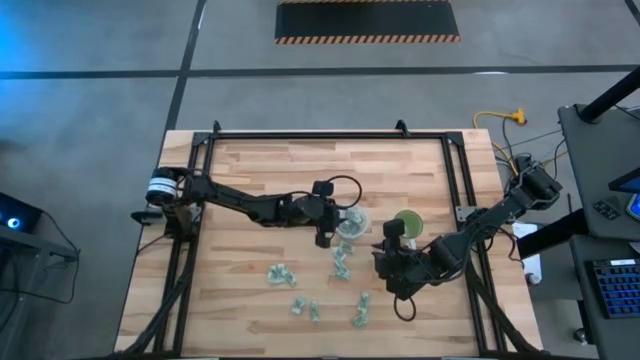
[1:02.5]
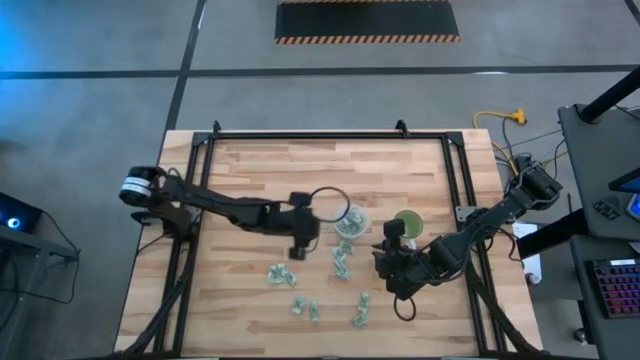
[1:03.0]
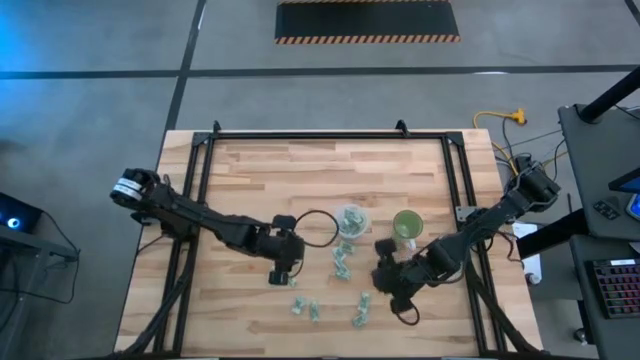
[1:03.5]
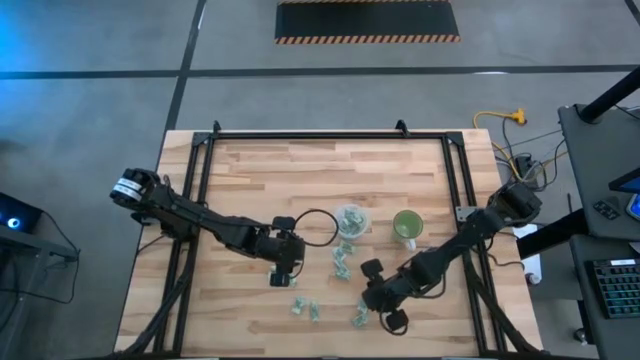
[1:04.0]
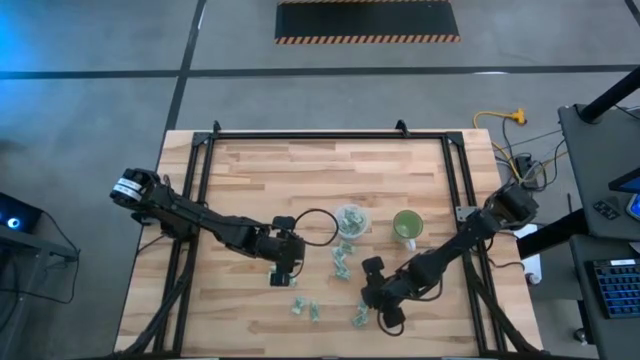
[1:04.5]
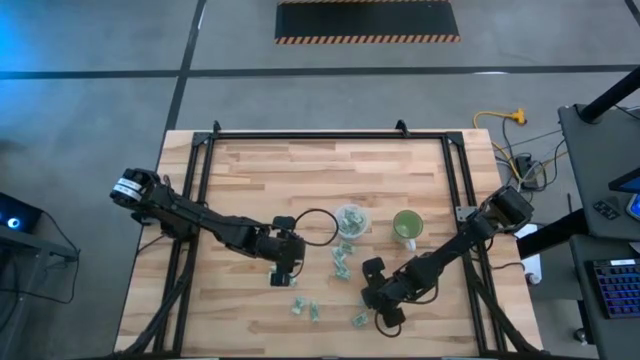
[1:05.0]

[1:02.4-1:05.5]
Task: Pick and place Stevia / Truvia into bins
Put the green stevia packet into the transparent container

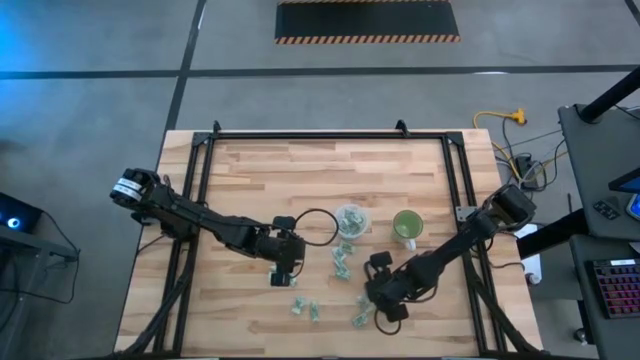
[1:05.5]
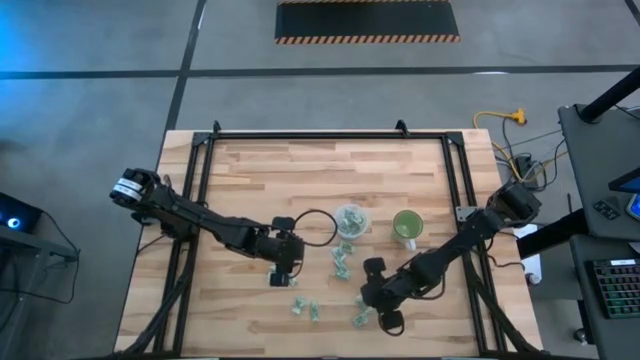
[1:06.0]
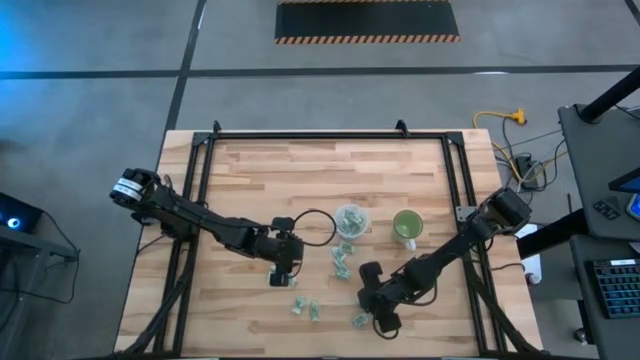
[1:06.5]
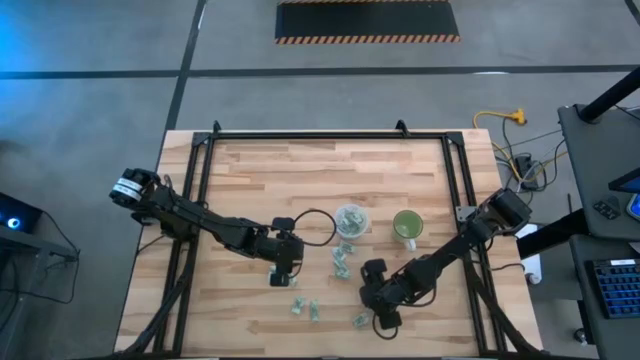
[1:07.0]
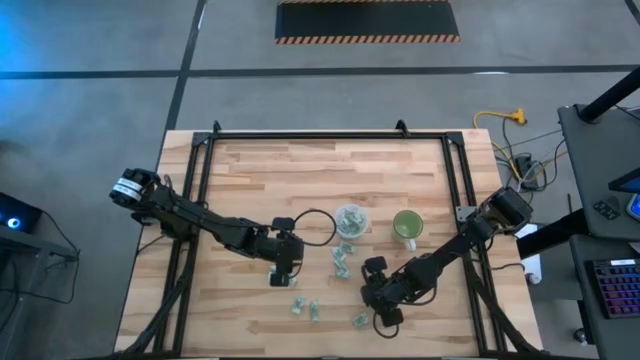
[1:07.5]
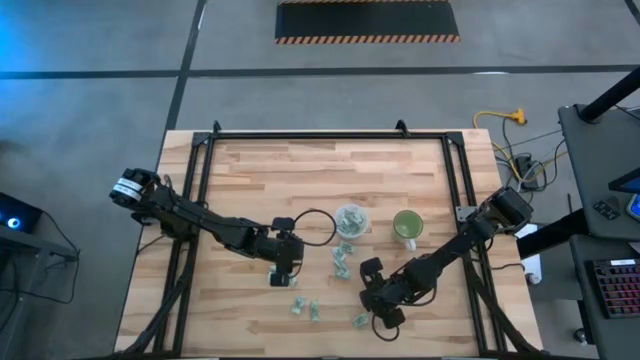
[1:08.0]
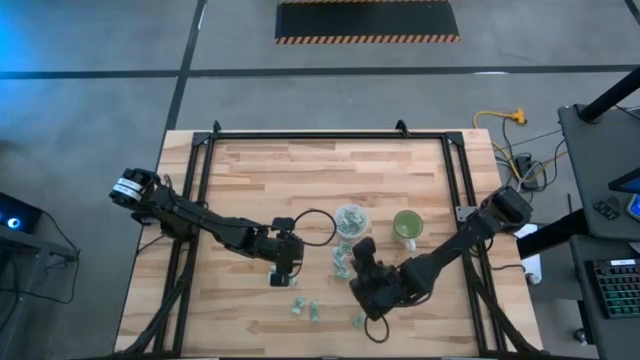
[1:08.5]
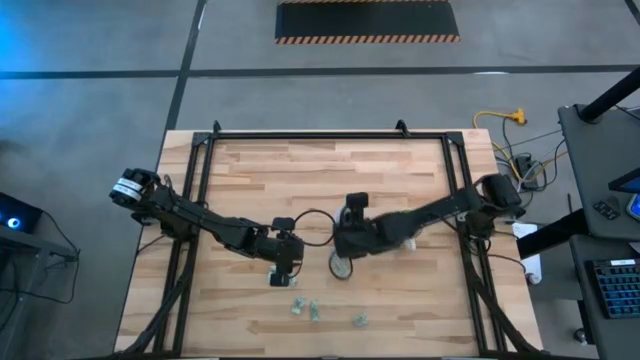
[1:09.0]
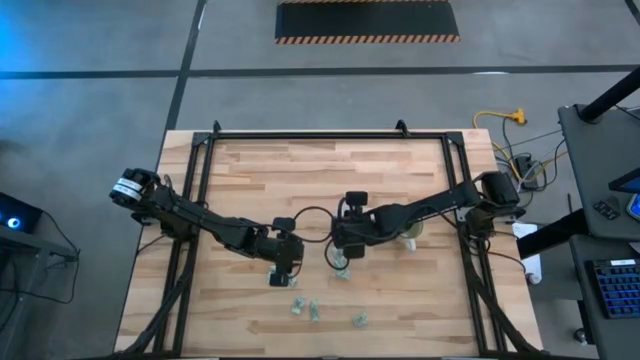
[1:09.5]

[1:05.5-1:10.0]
Put the green stevia packet into the transparent container

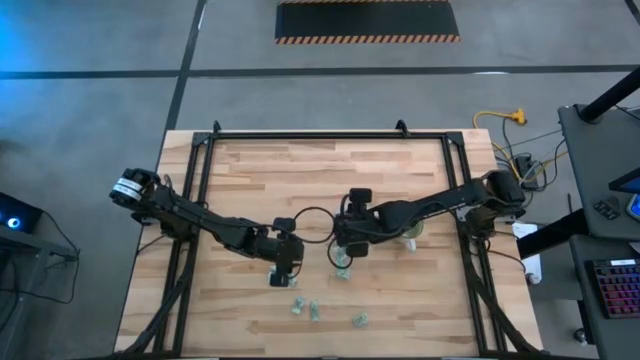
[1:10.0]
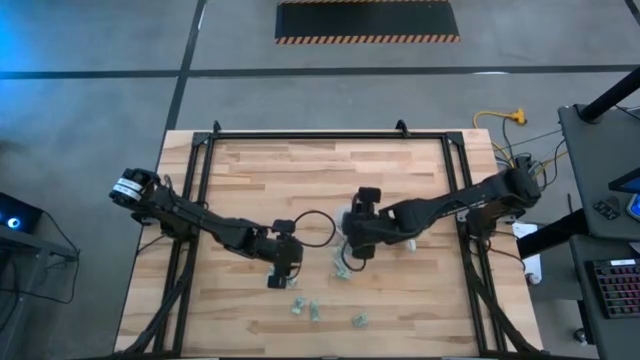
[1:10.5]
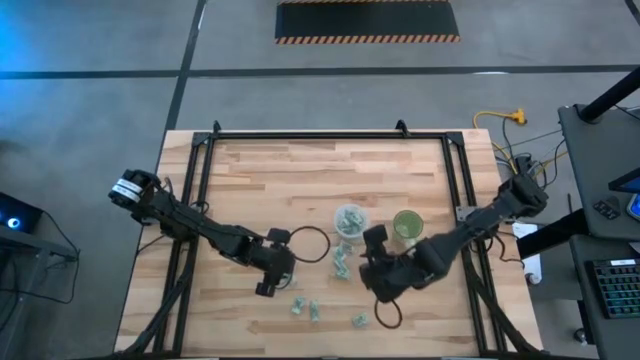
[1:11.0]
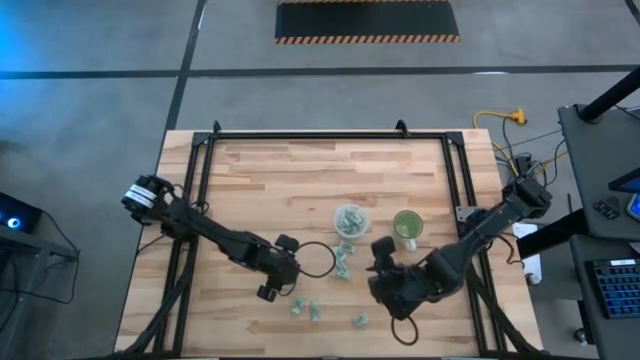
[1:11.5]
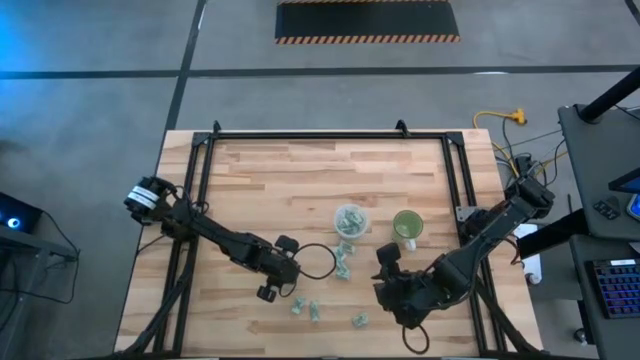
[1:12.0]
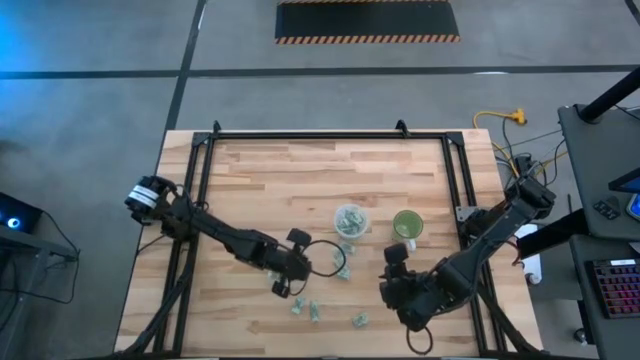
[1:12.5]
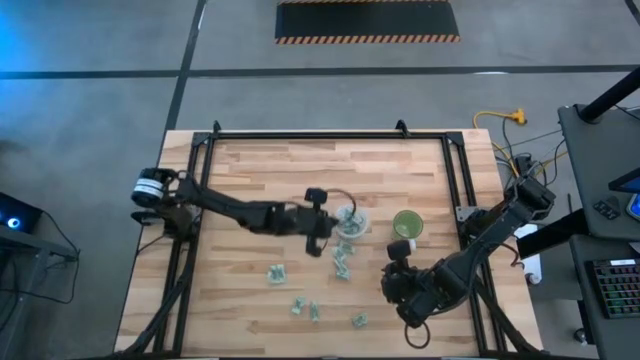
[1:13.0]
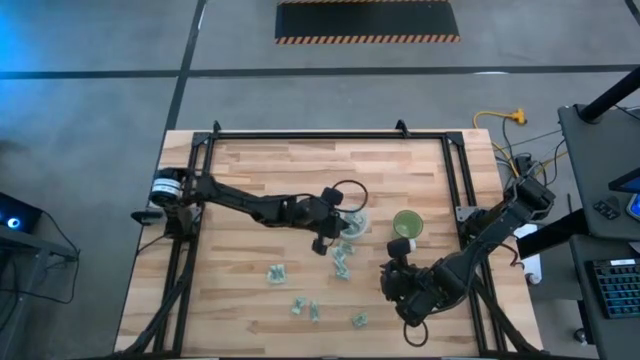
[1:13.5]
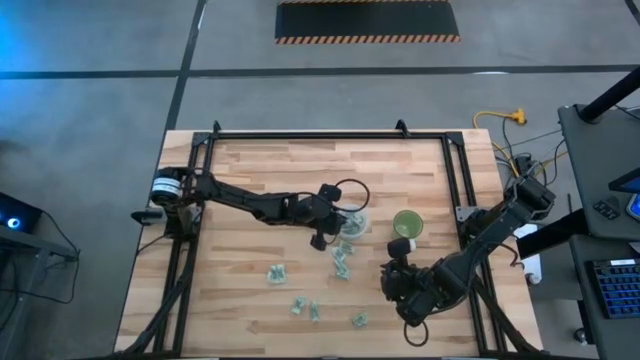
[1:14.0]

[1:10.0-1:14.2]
Put the green stevia packet into the transparent container

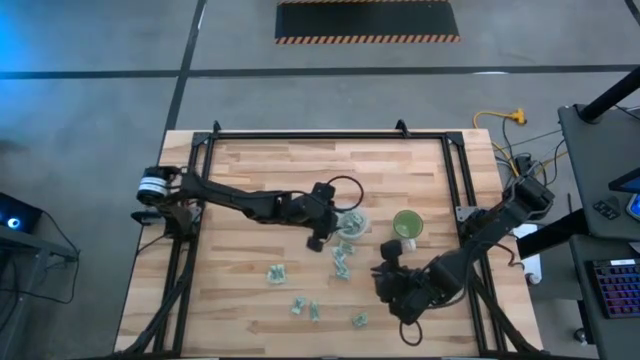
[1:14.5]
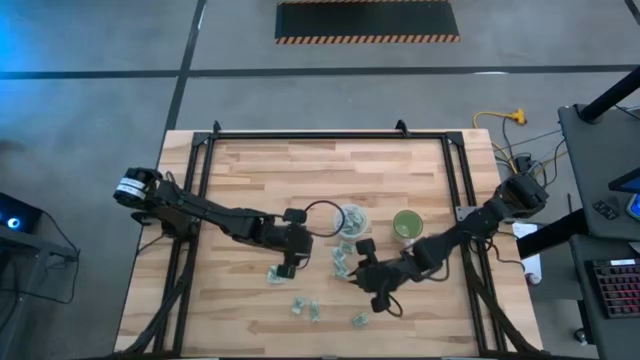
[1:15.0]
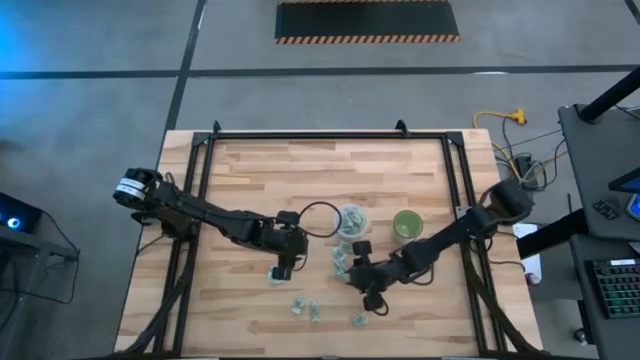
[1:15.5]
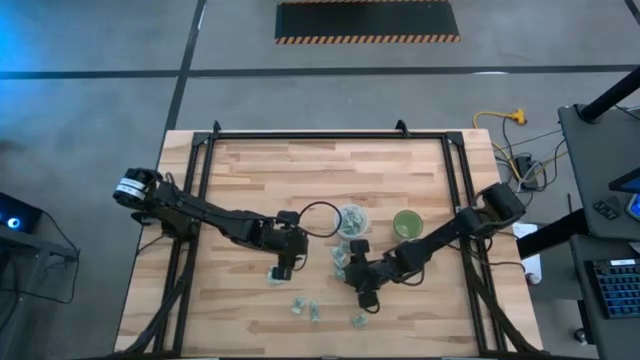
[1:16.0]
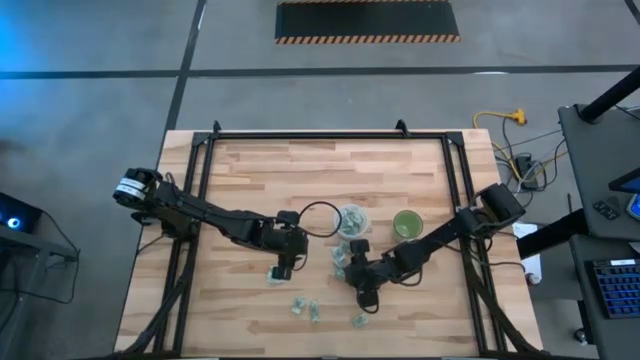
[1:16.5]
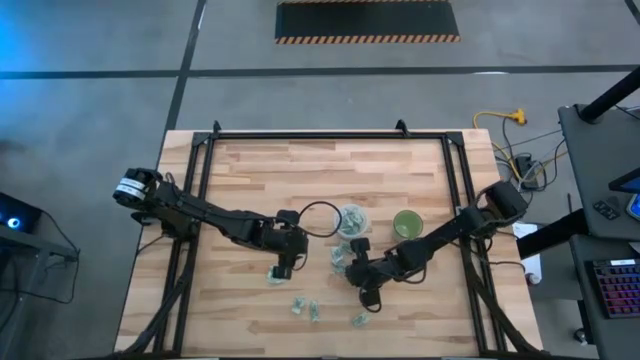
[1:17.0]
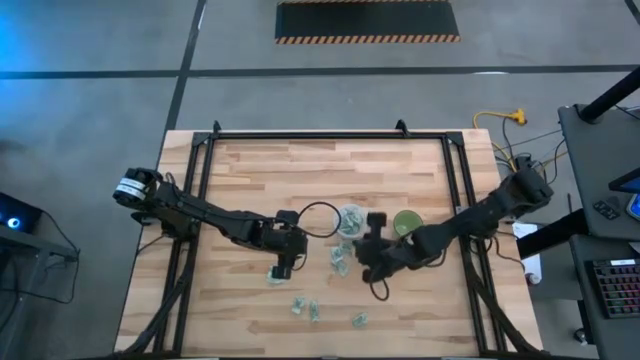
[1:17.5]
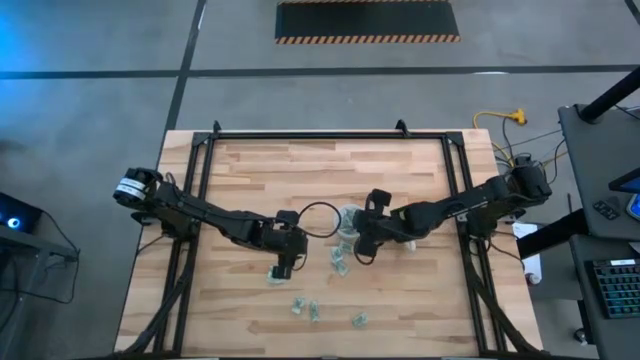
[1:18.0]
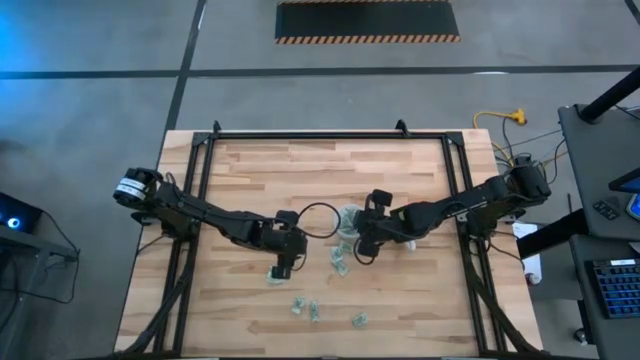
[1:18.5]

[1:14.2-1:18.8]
Put the green stevia packet into the transparent container

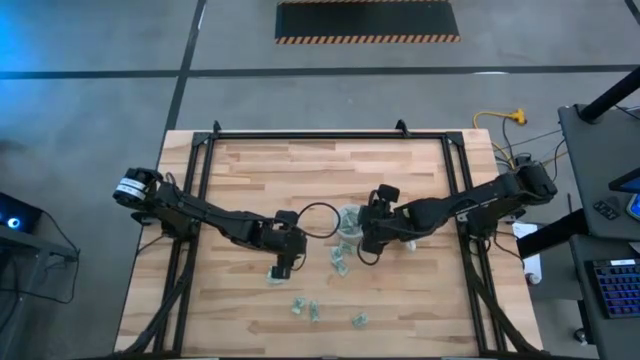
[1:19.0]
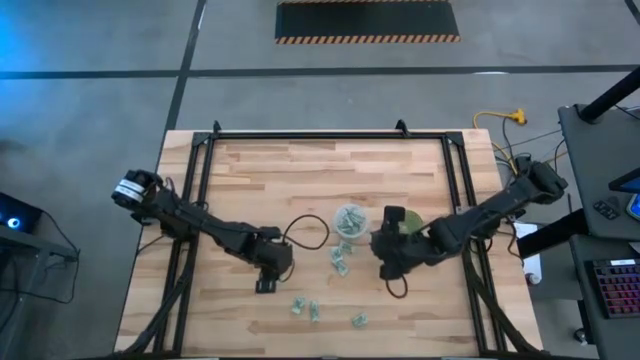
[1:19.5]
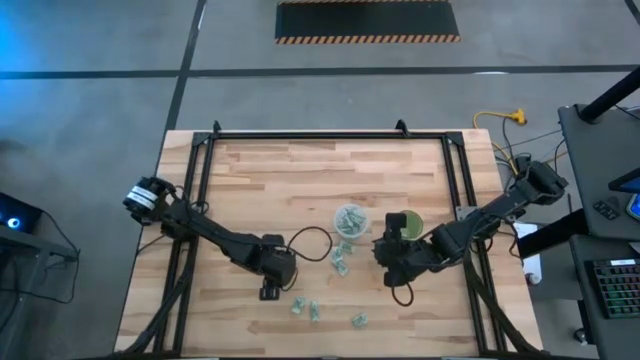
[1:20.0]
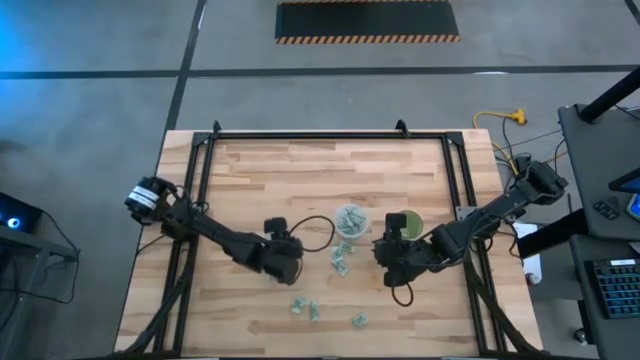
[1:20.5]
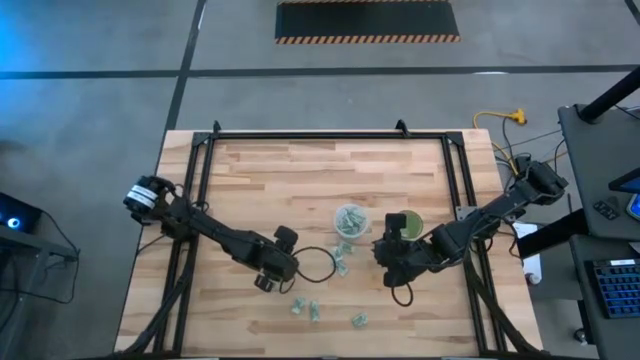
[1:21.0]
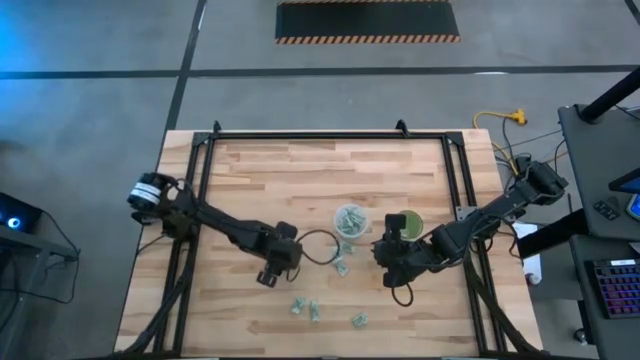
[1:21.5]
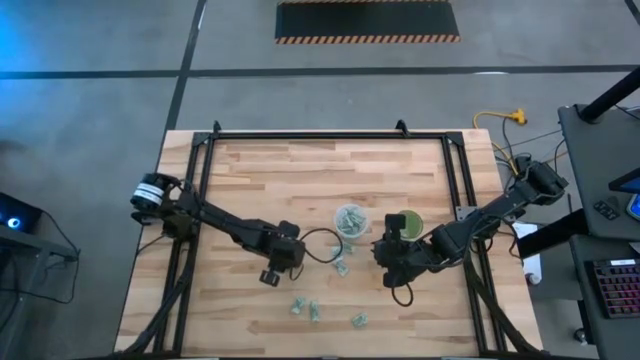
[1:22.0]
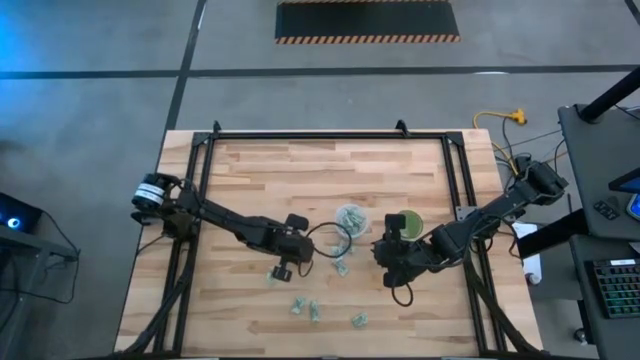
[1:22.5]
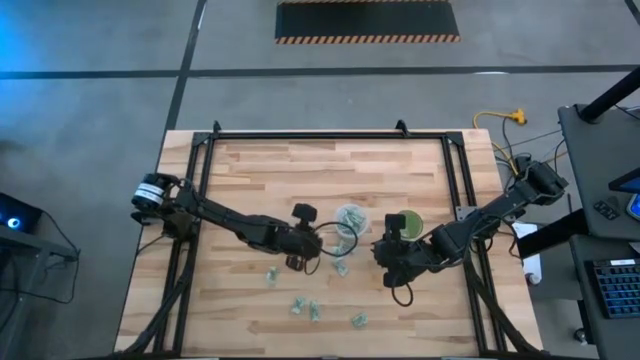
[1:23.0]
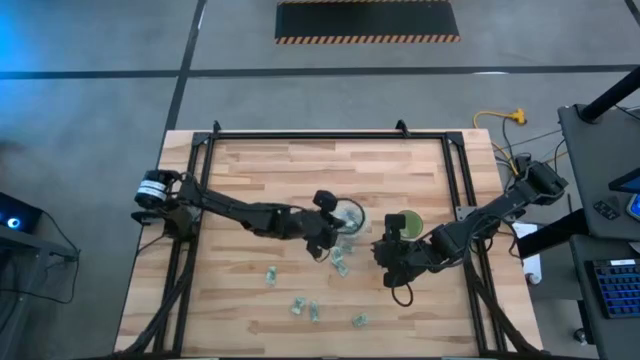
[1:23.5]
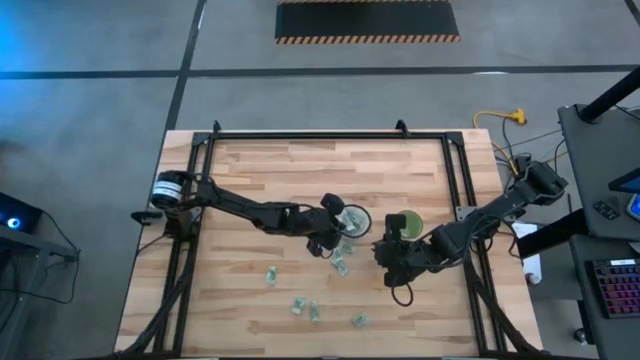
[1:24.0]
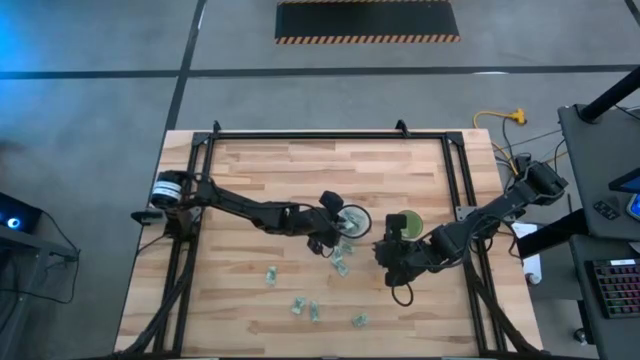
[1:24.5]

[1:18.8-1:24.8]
Put the green stevia packet into the transparent container
